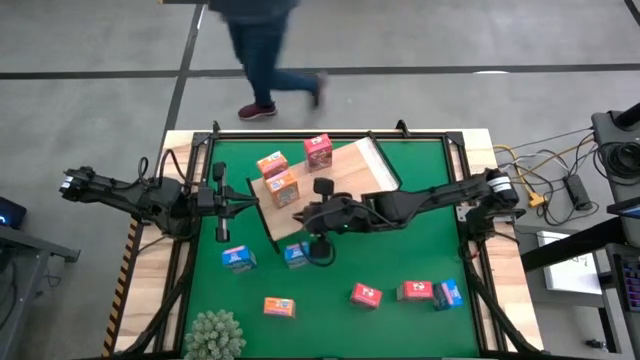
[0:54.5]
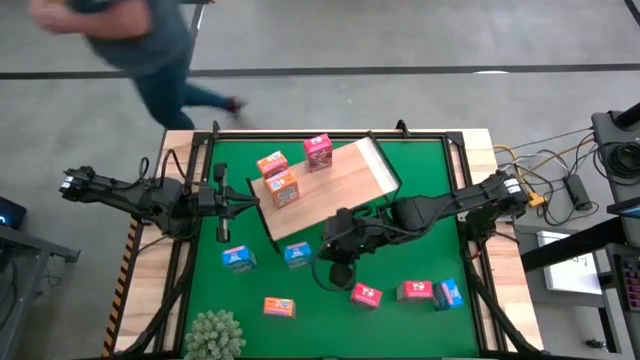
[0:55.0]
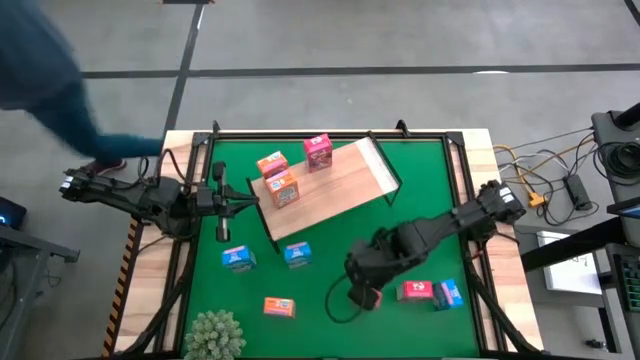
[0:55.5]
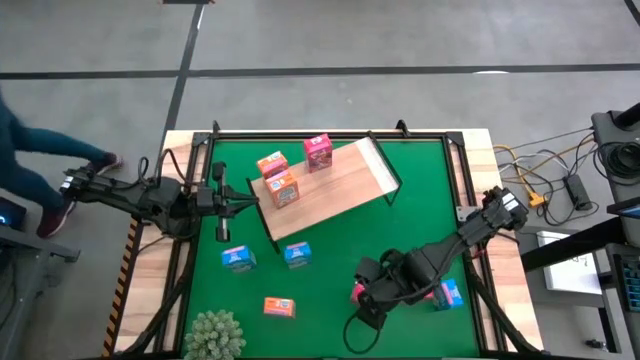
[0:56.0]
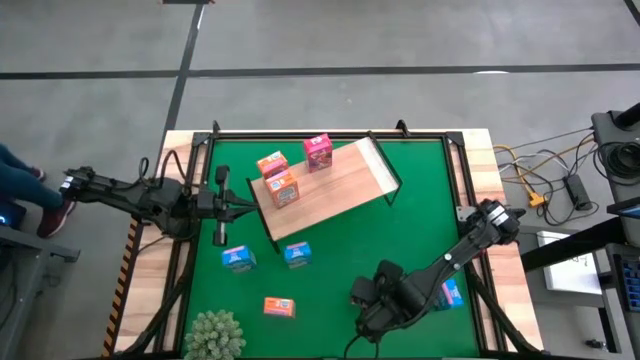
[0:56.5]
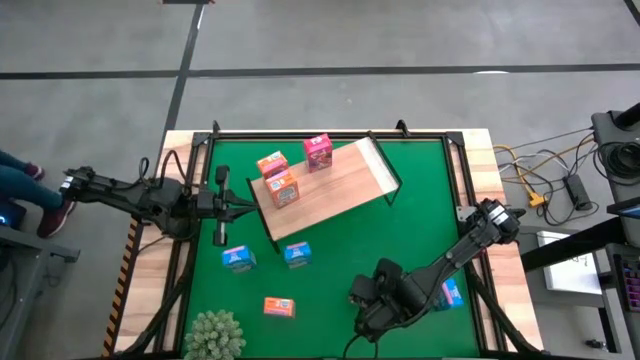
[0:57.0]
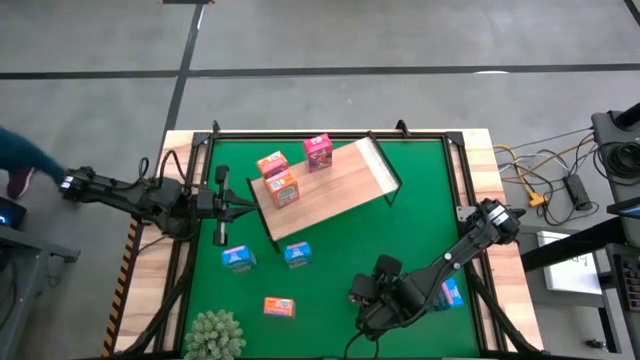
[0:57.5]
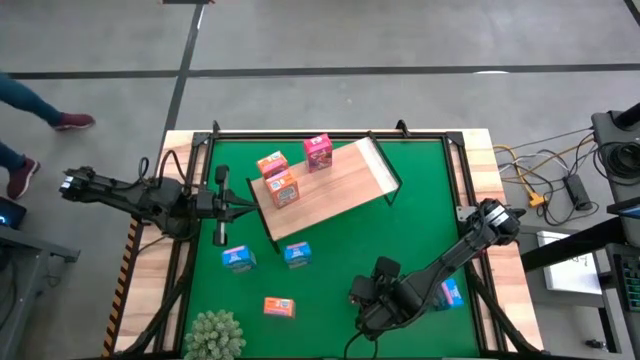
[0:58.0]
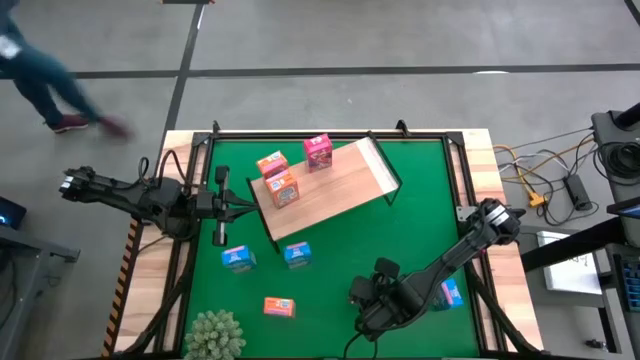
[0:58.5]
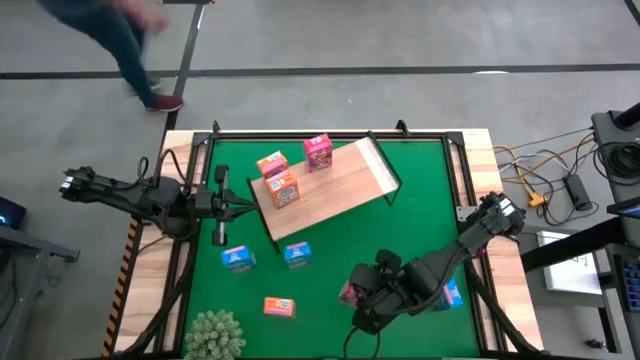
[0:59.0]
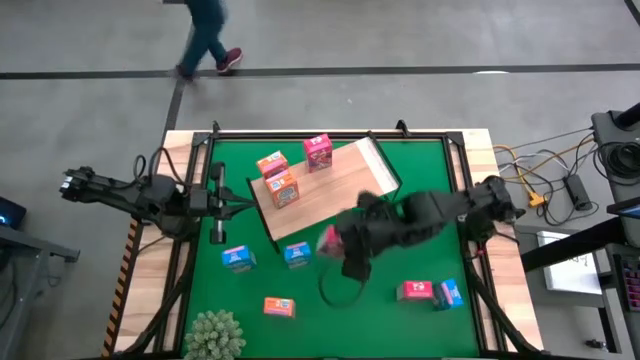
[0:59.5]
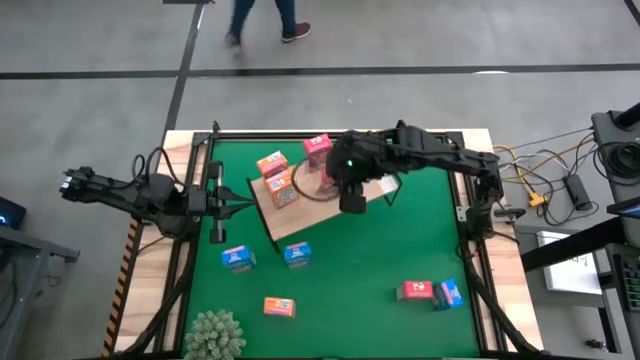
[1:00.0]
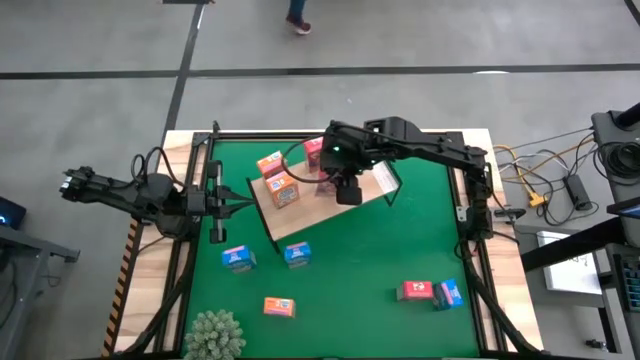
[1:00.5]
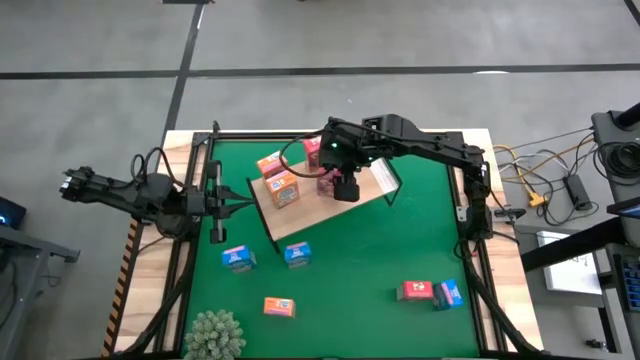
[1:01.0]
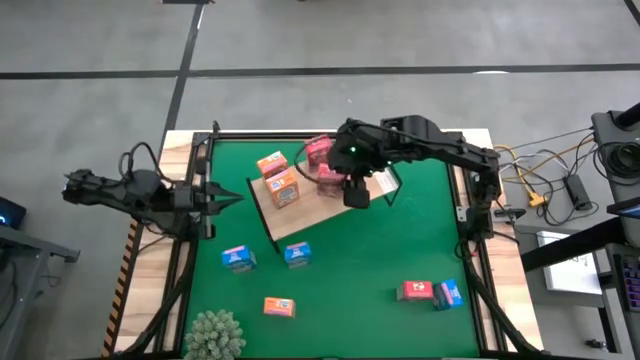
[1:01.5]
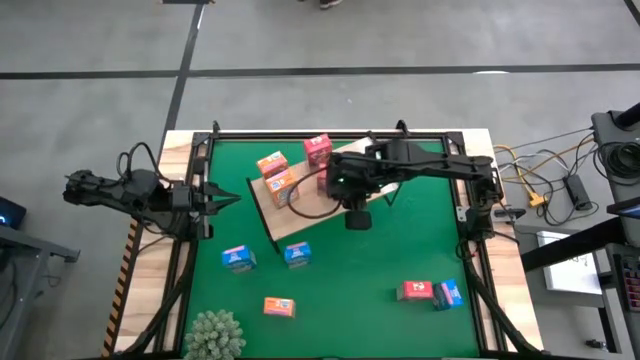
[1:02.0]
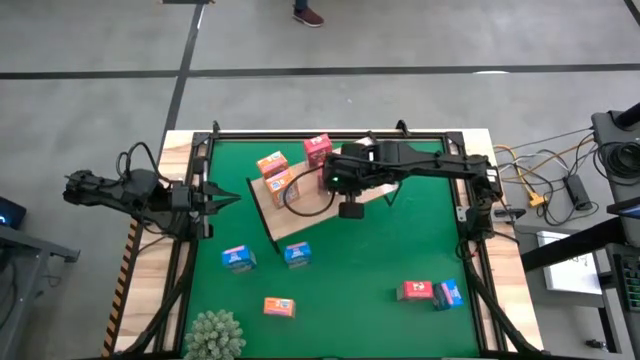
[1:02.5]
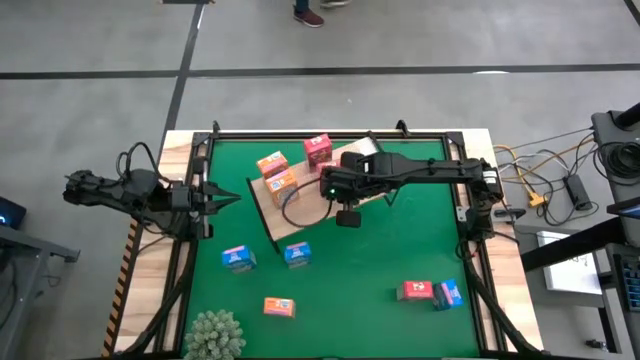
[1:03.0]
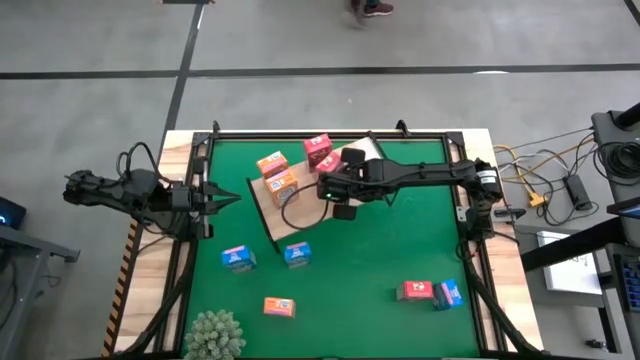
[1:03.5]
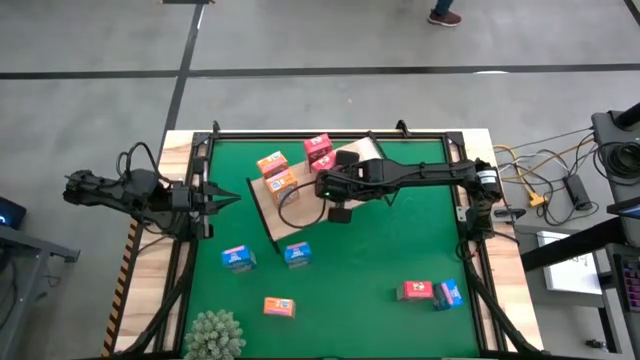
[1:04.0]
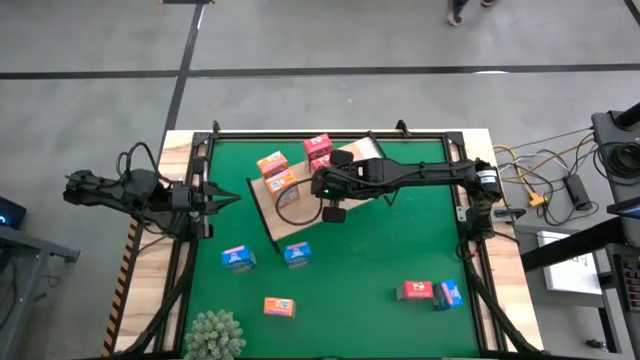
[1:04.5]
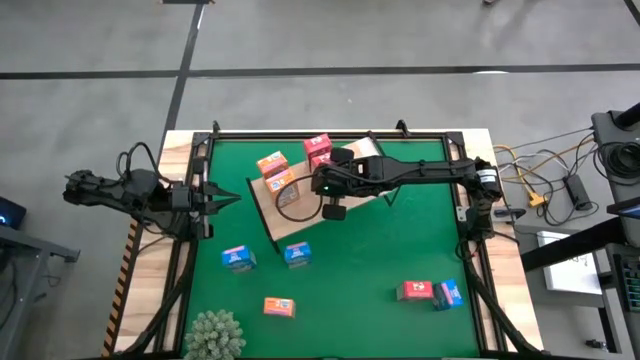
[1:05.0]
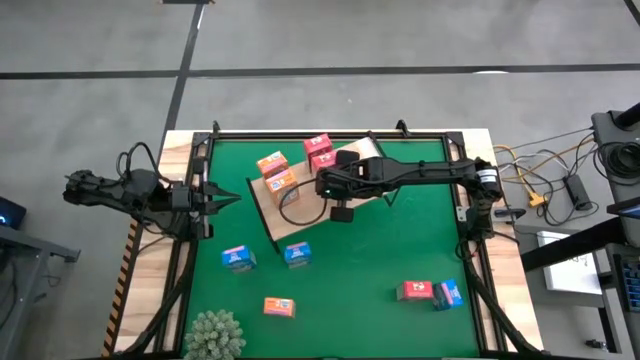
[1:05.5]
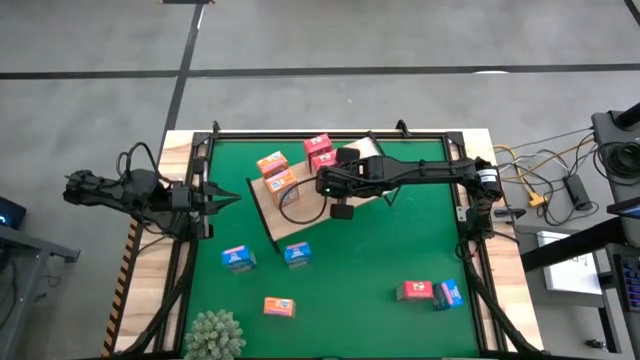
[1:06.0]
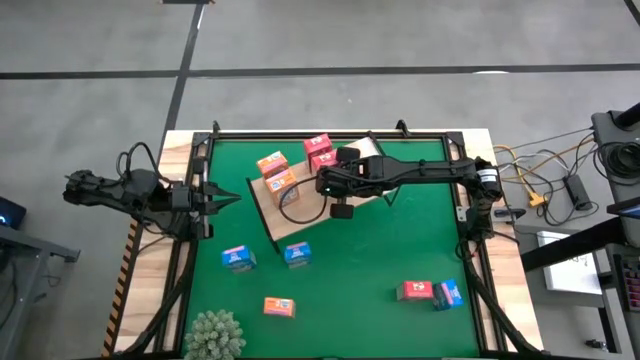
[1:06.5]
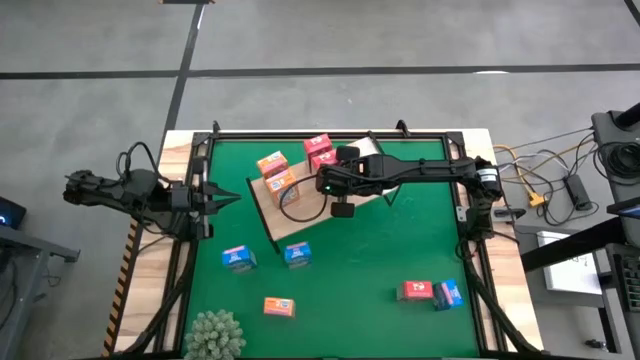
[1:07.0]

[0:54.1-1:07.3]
Task: Stack cereal on shelf
Put the left red cereal box on the shelf aligned with the other red cereal box

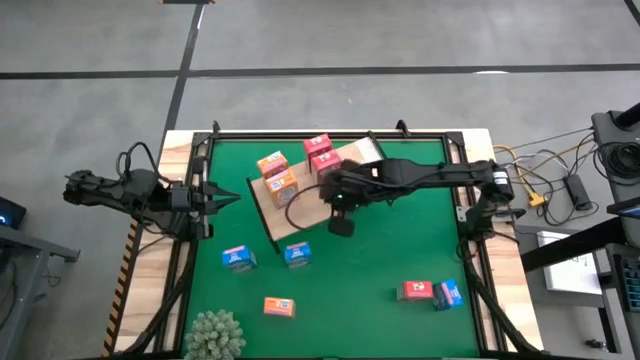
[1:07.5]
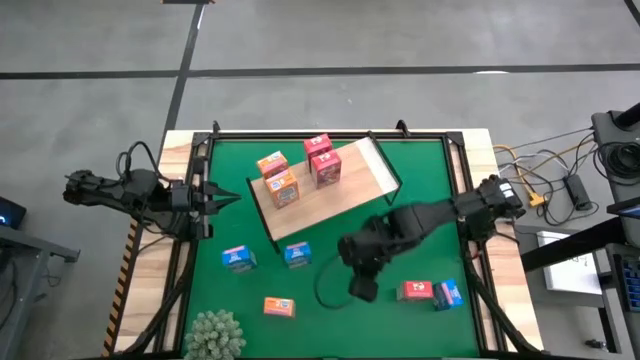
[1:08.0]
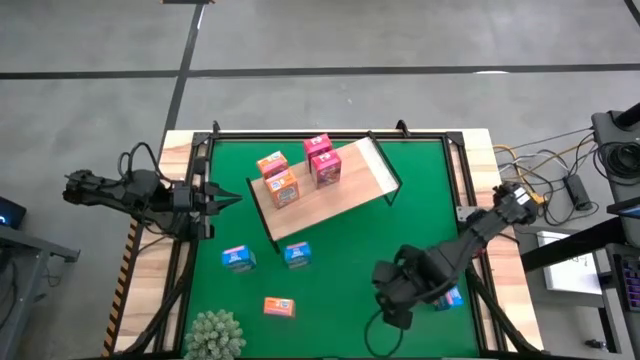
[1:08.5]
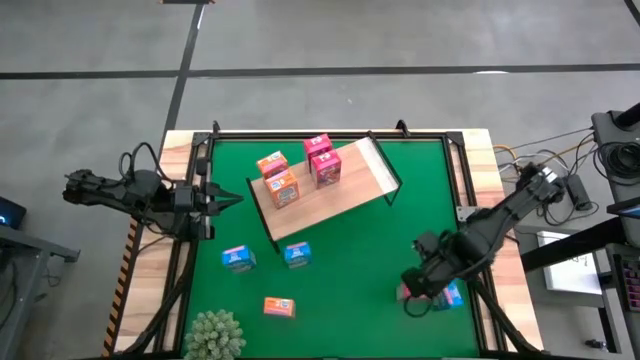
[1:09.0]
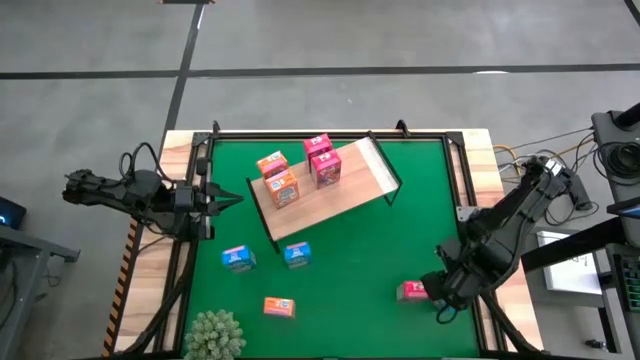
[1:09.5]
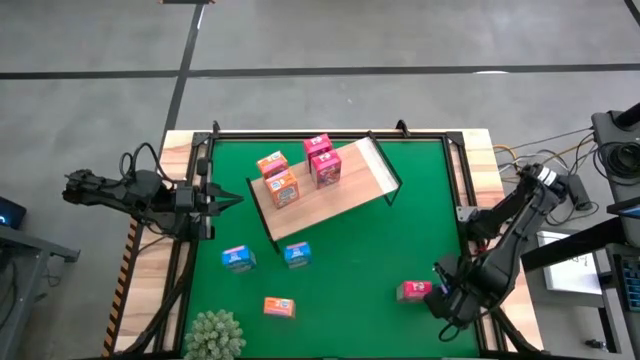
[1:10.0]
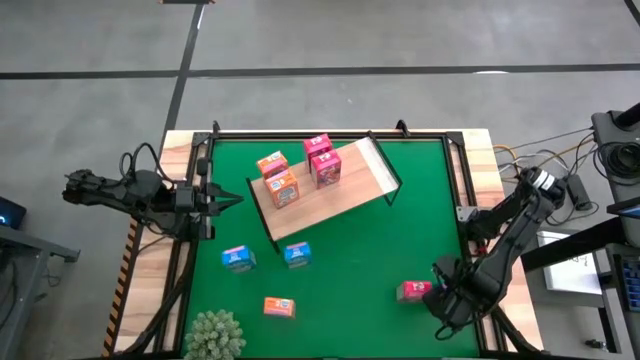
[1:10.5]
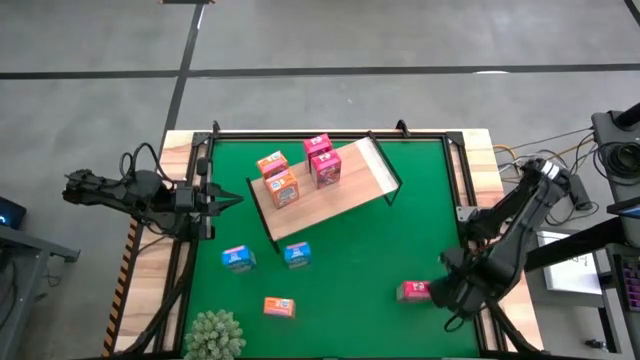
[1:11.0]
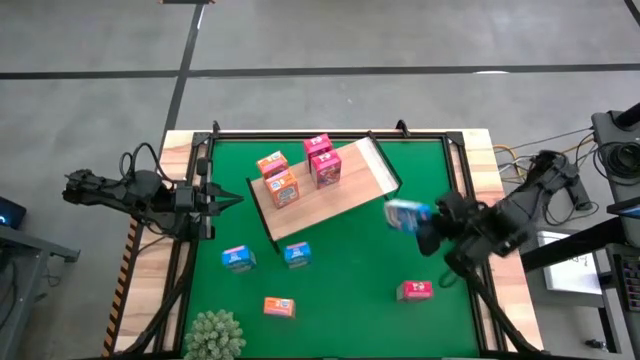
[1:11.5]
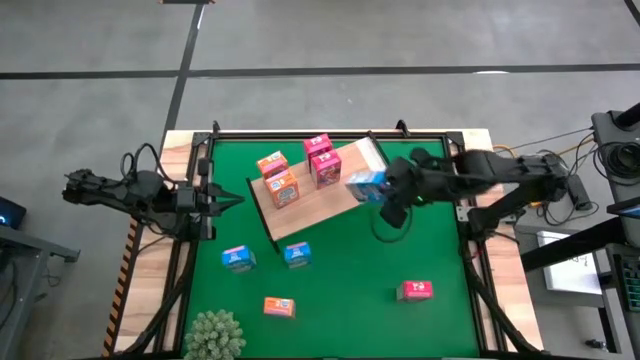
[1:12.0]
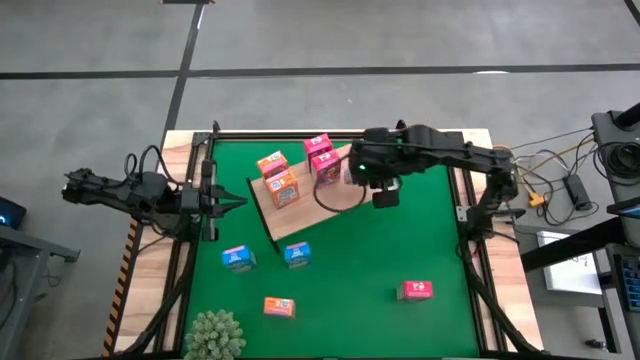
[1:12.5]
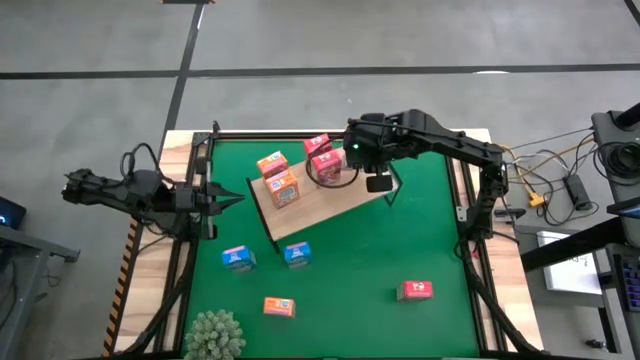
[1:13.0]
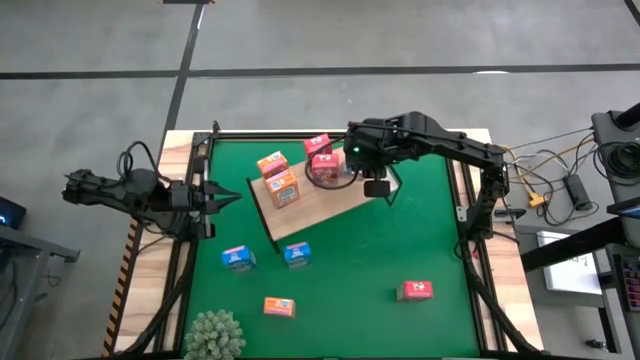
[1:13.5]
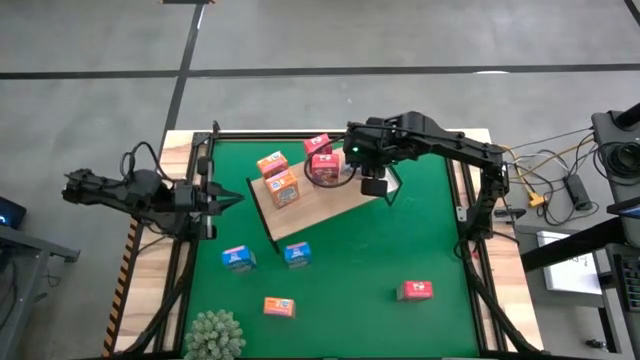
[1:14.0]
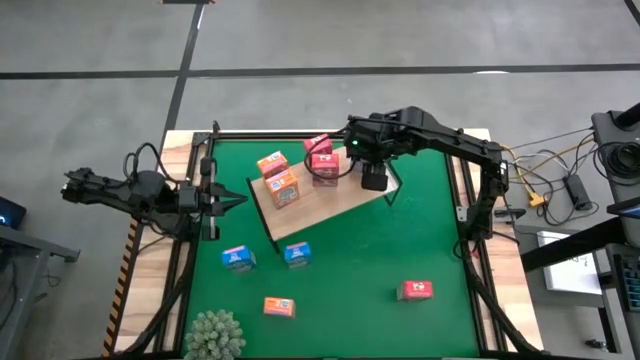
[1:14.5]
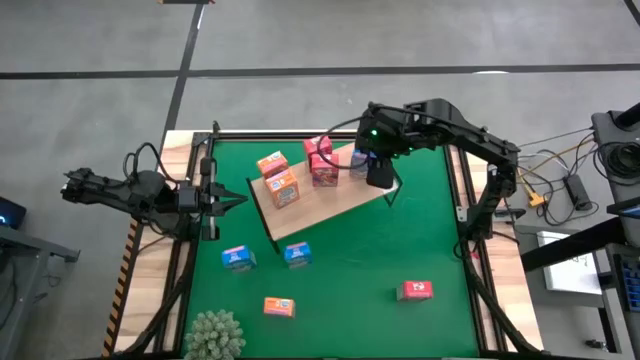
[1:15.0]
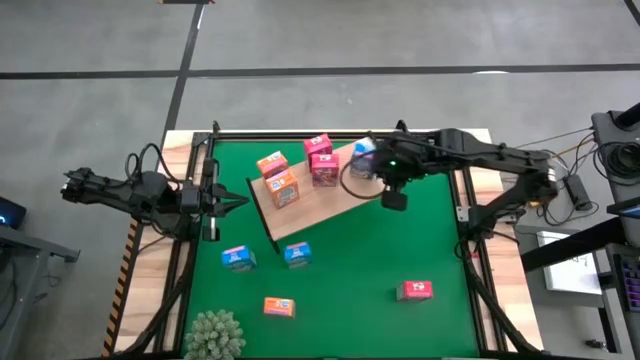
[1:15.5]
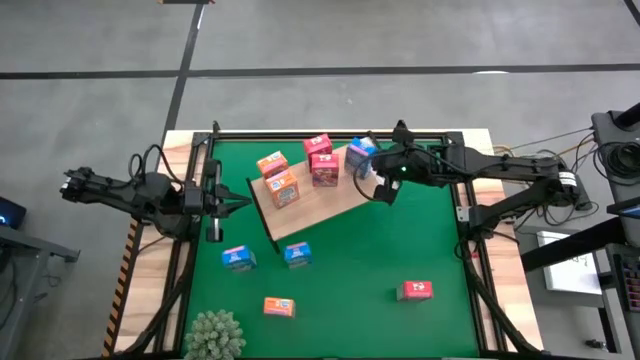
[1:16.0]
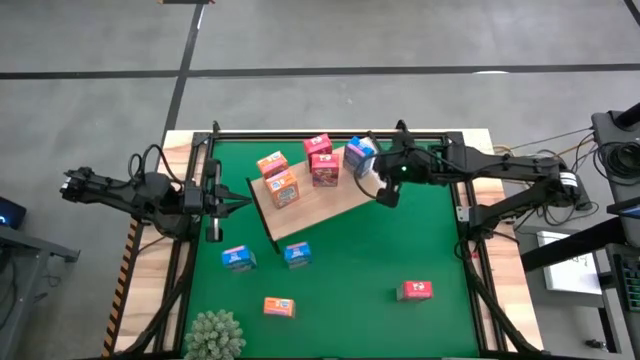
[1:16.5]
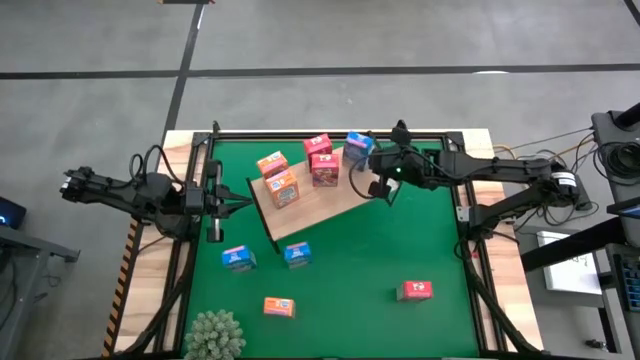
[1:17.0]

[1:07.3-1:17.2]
Put the right blue cereal box on the shelf
